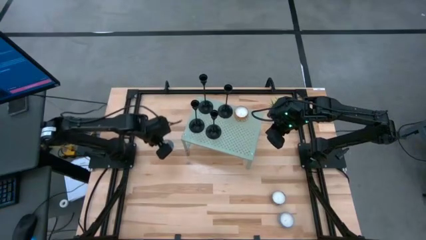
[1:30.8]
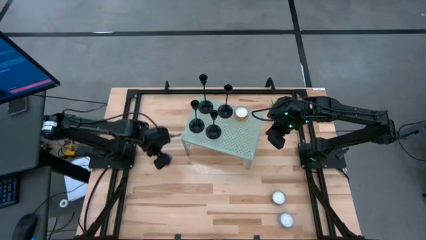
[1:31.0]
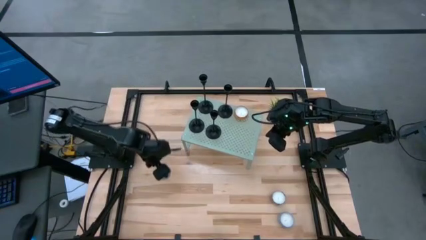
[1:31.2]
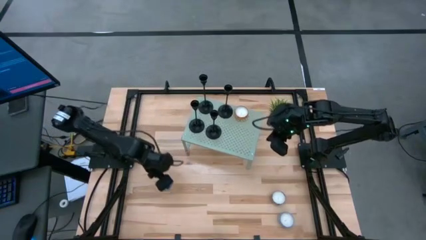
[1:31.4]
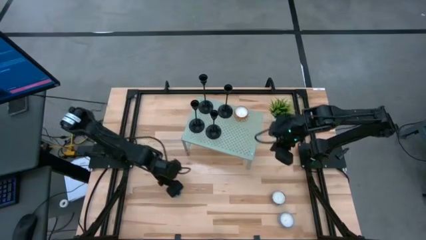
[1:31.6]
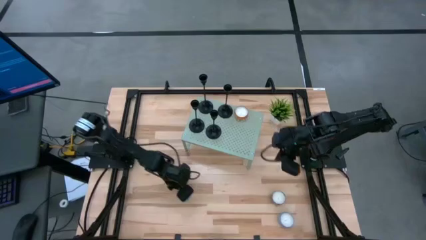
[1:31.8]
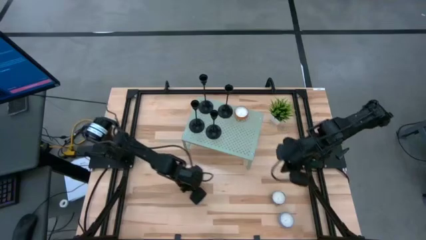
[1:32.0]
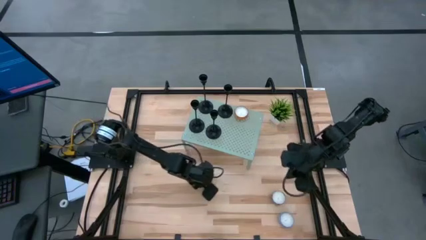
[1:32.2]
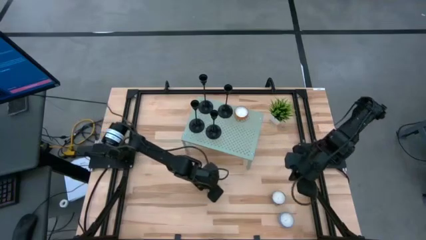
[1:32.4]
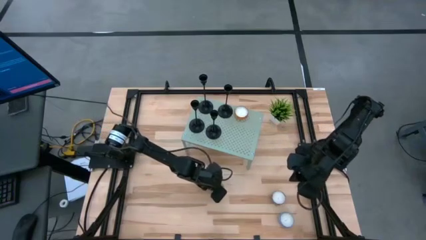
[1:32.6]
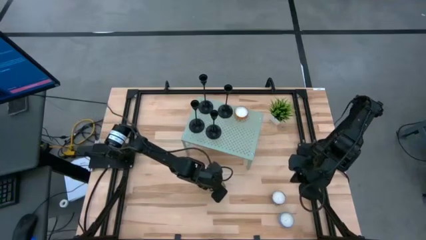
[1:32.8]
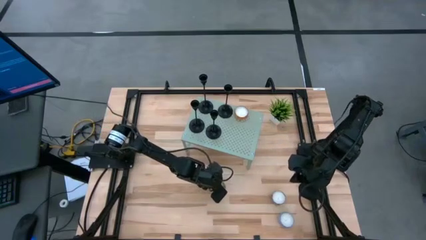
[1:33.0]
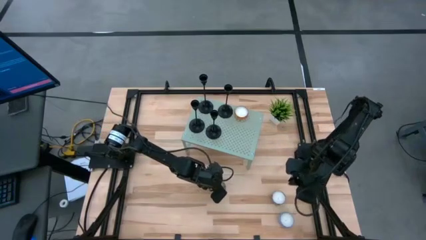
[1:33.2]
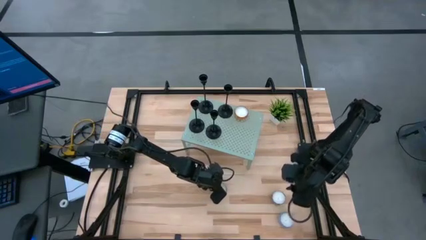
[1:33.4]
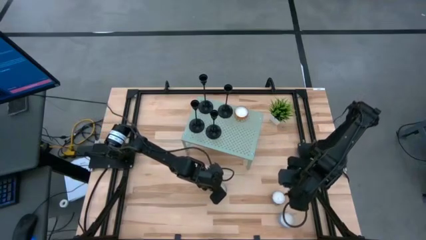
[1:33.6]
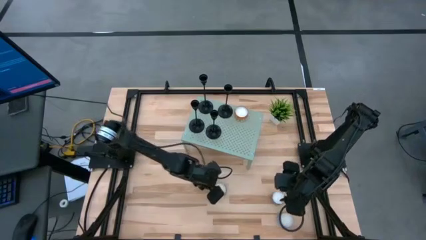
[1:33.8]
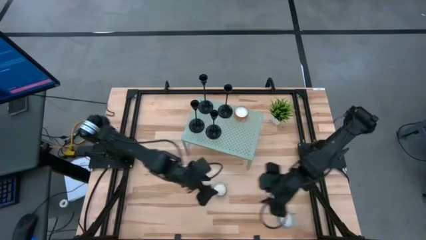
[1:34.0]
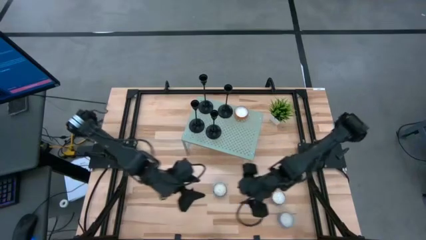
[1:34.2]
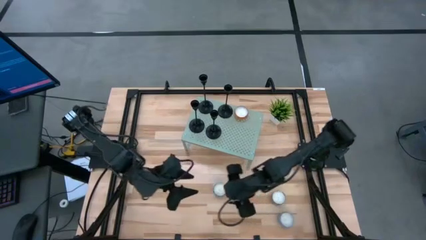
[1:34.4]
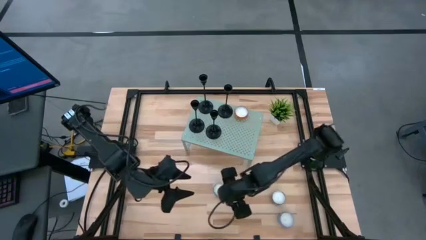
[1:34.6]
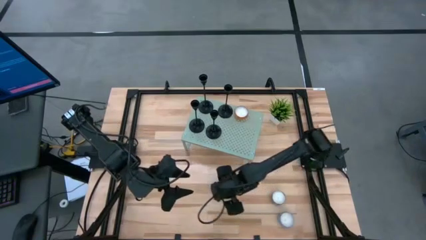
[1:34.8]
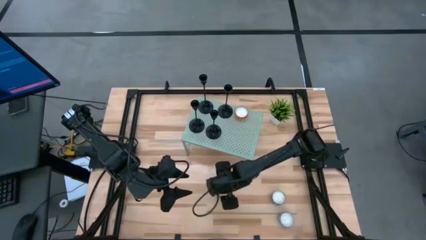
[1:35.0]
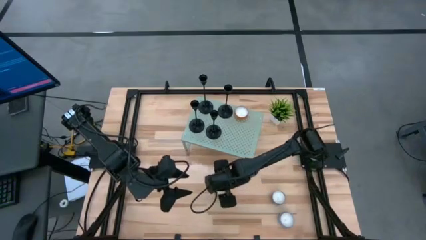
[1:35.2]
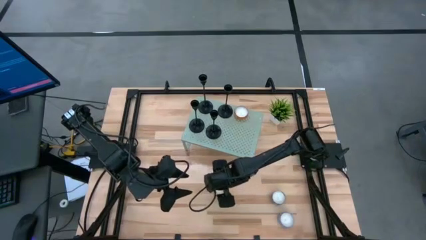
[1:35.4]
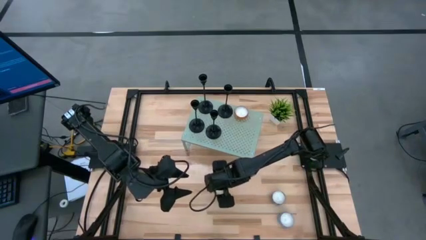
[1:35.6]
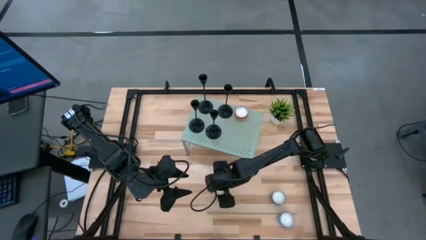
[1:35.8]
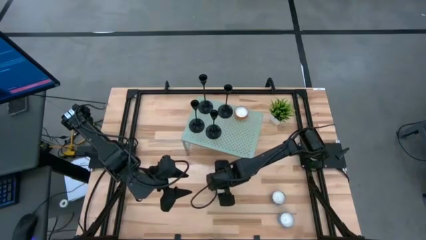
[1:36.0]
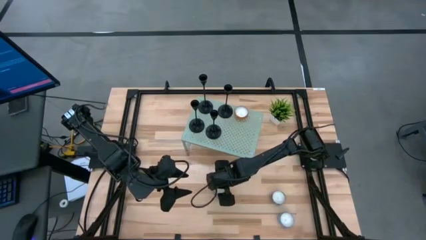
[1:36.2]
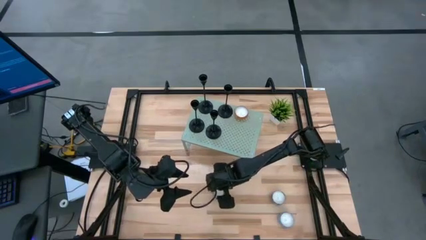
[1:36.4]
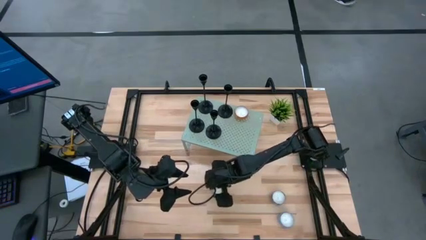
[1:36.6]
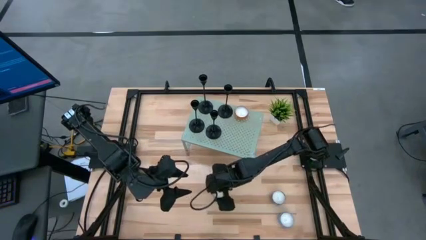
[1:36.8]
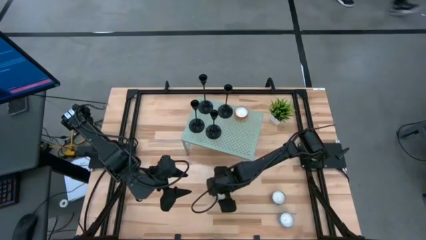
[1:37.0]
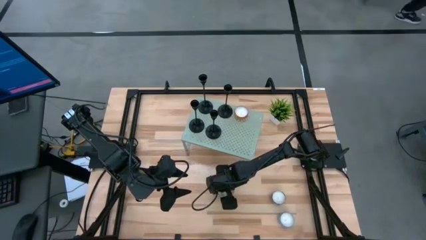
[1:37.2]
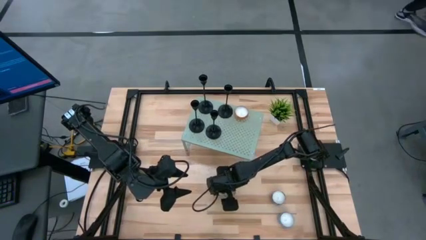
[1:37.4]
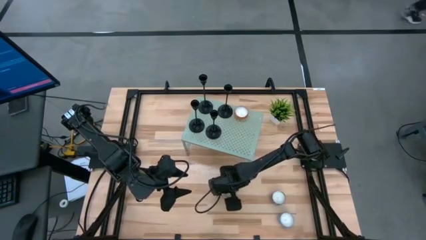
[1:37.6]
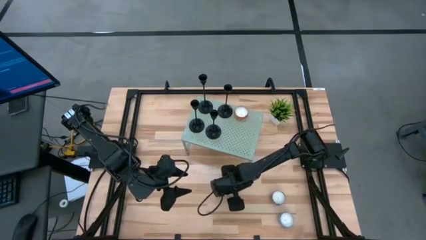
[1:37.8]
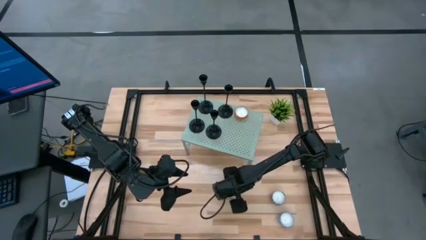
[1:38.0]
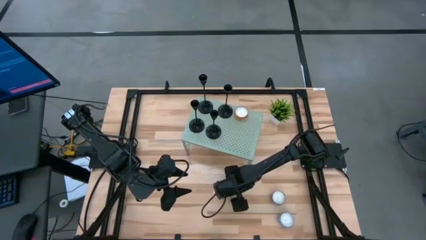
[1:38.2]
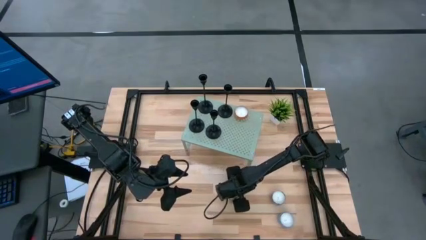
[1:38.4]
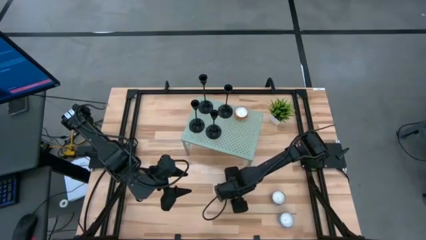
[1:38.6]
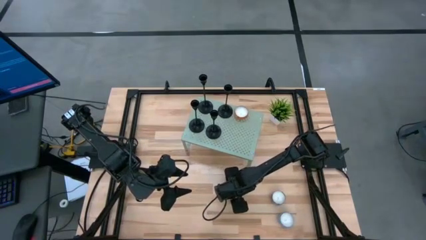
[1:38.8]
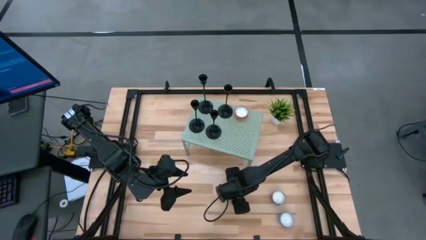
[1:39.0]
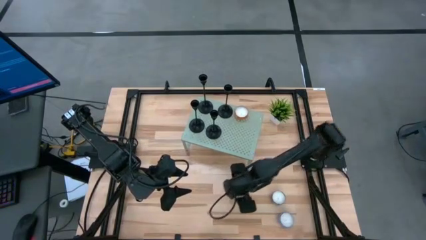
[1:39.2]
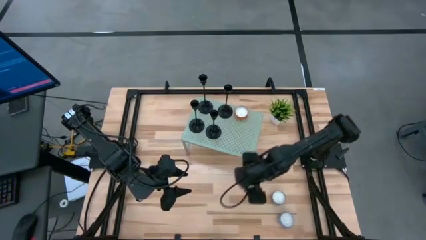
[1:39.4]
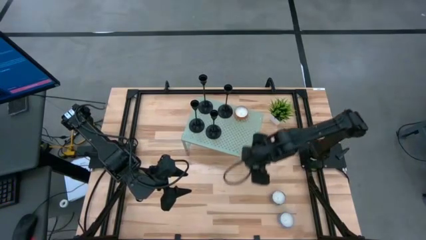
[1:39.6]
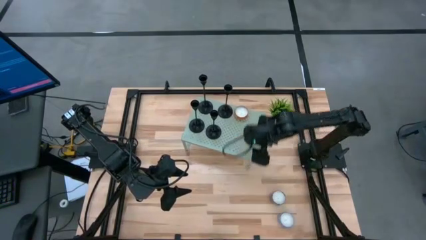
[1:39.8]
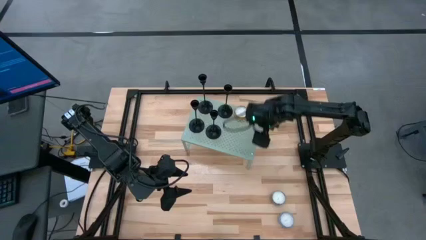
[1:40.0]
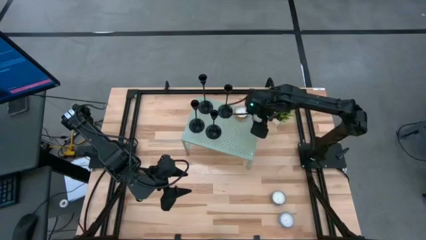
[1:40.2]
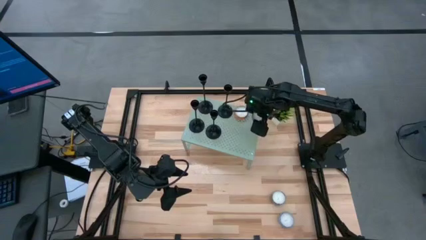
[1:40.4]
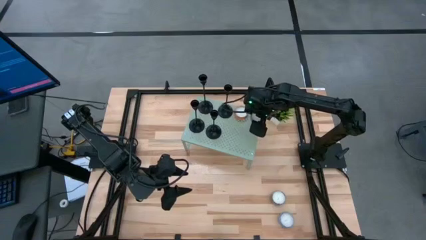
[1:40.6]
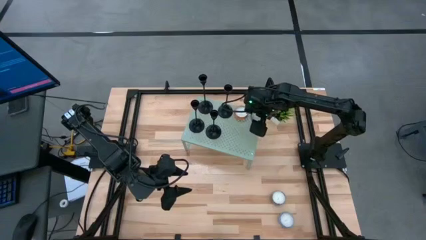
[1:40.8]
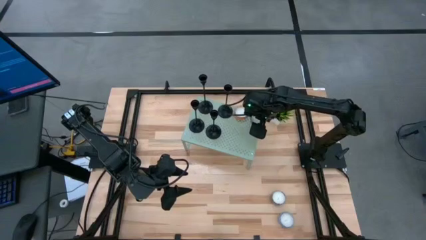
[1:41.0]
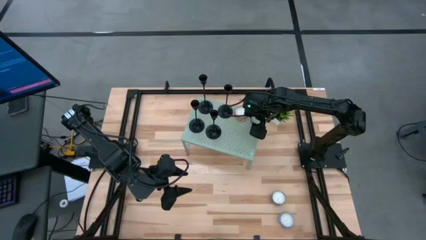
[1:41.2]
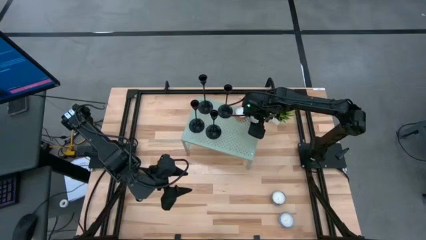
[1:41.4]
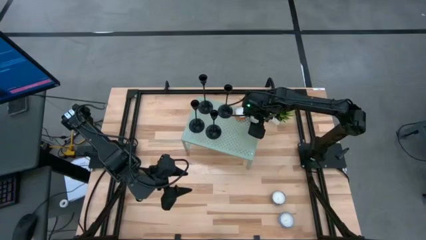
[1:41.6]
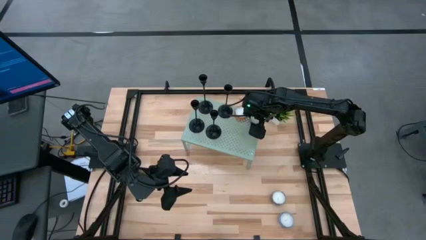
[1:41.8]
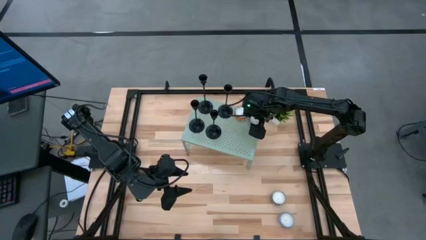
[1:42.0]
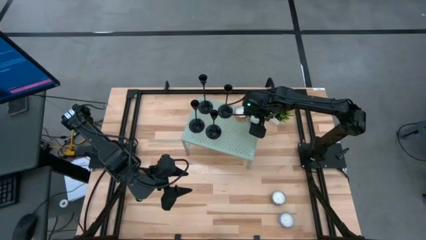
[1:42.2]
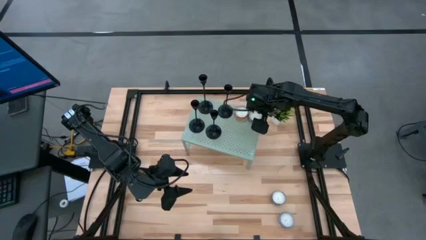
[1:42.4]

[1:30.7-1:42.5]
Task: Pick & Place candle stick holders
Put the blue scented candle on the shelf

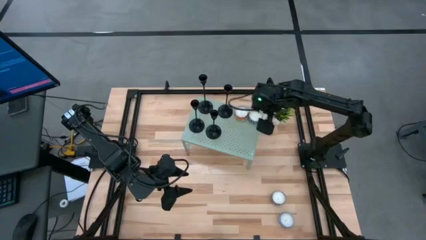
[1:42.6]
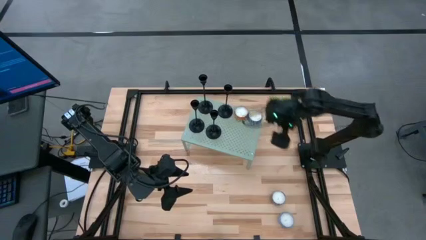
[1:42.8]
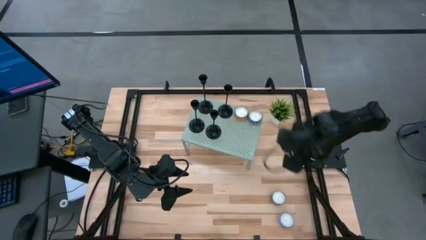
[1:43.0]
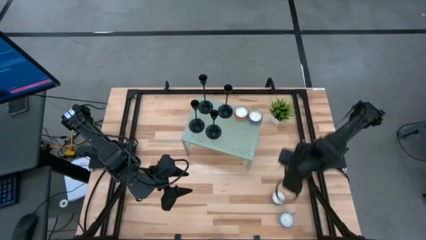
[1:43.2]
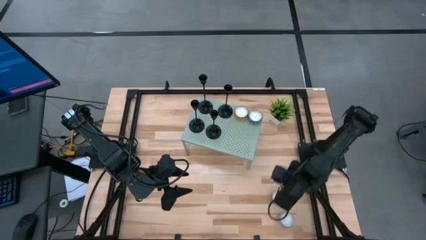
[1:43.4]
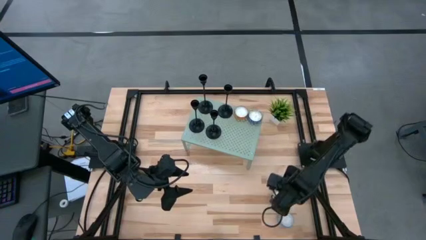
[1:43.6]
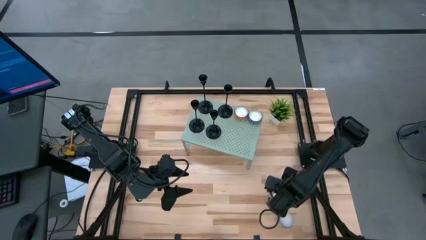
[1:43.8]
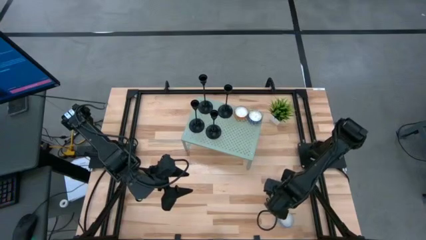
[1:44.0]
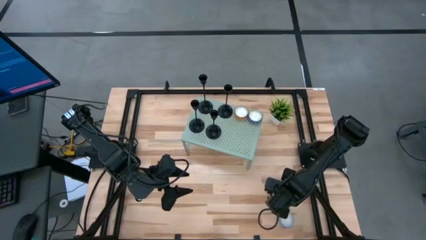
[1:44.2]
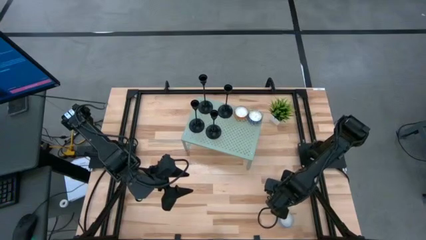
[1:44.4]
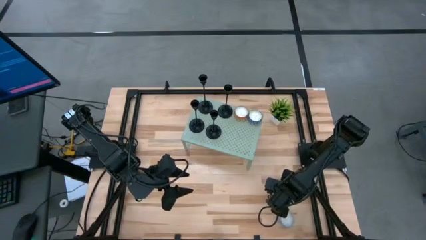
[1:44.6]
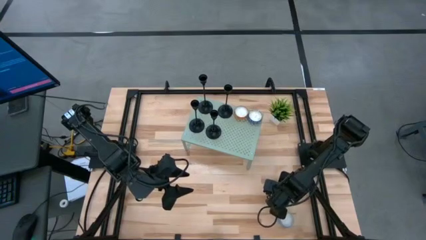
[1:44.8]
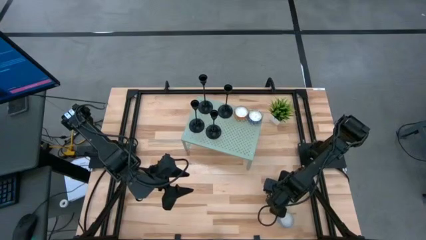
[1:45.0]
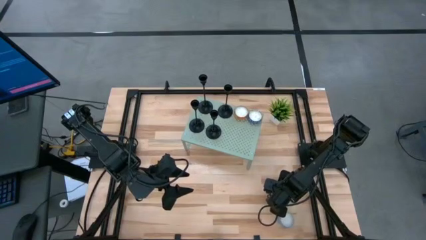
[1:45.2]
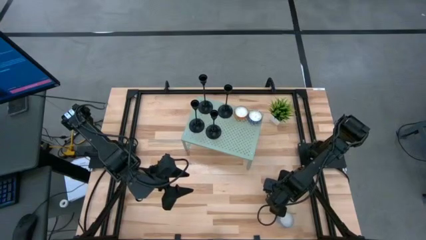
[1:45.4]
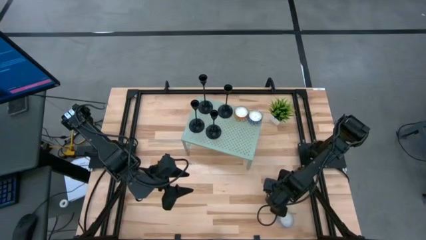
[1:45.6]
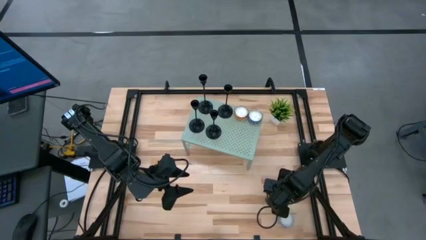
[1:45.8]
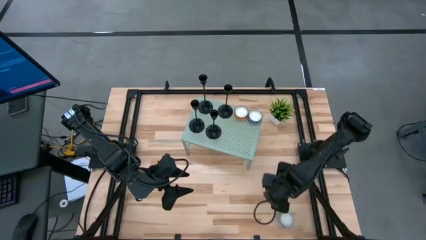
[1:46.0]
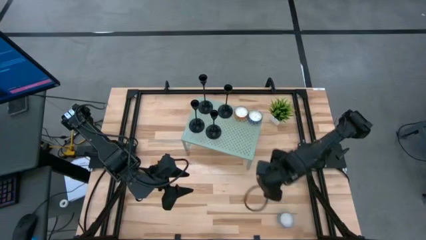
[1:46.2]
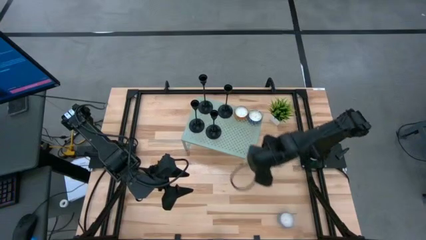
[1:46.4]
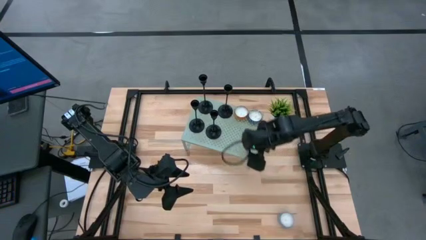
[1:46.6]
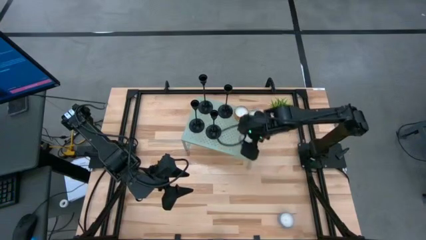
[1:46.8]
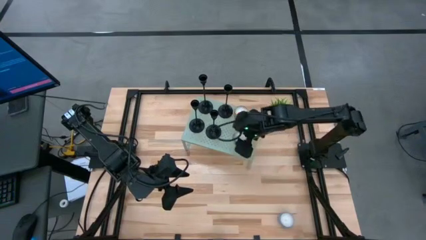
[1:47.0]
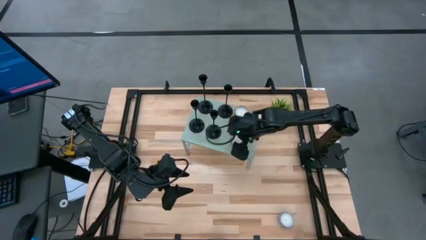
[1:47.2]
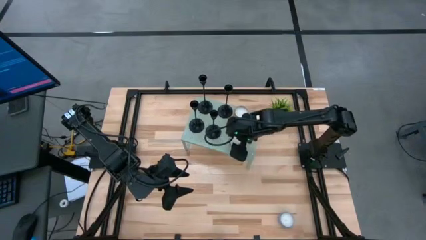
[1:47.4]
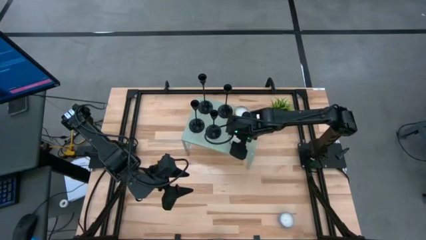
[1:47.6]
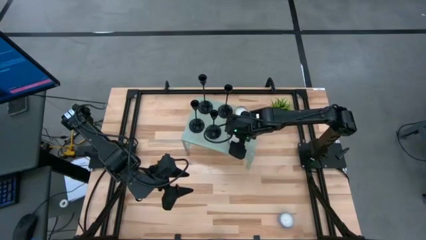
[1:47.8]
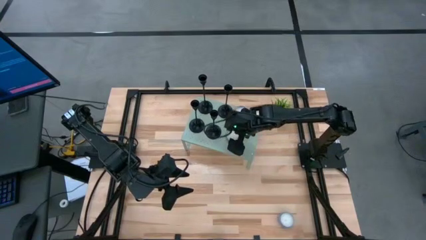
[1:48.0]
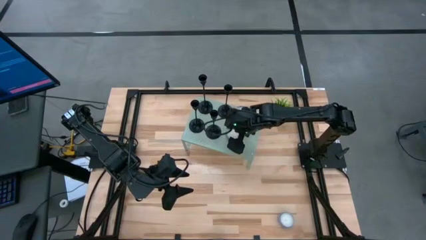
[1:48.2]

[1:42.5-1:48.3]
Put the brown and white scented candle on the shelf
